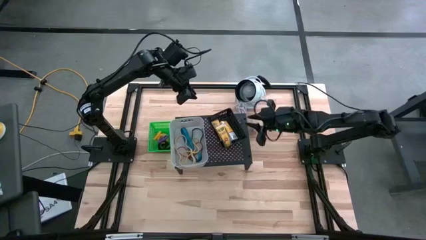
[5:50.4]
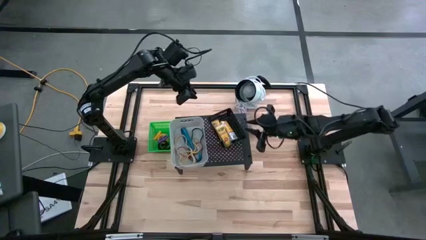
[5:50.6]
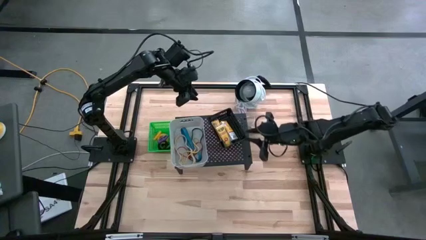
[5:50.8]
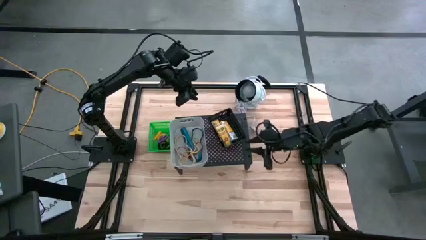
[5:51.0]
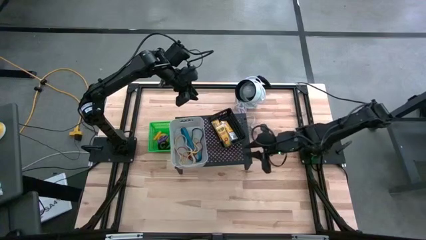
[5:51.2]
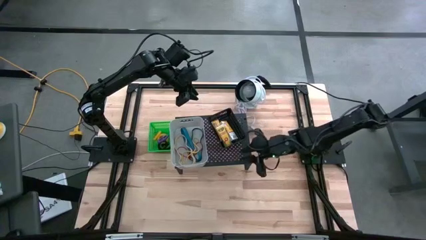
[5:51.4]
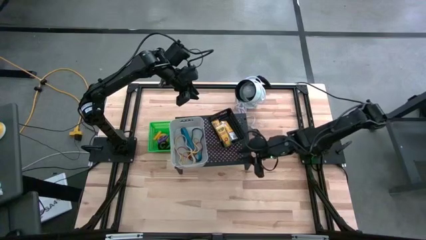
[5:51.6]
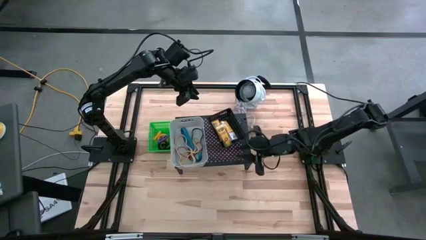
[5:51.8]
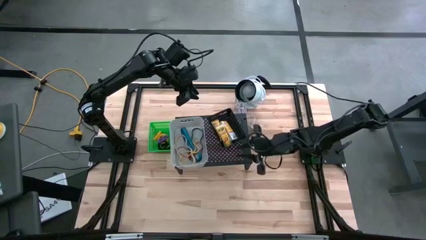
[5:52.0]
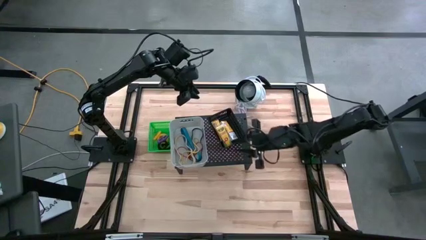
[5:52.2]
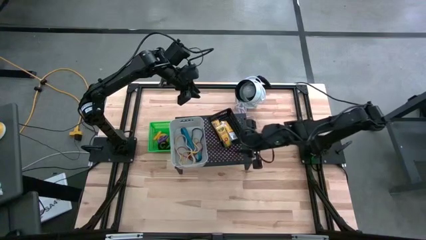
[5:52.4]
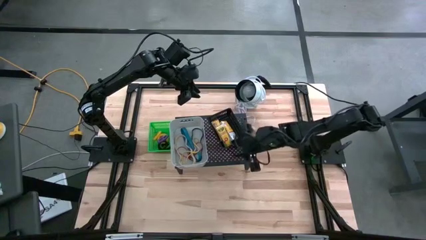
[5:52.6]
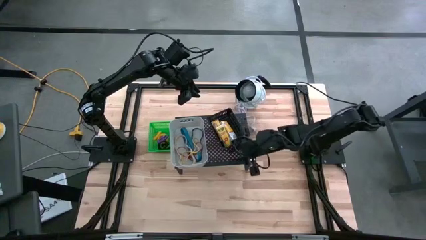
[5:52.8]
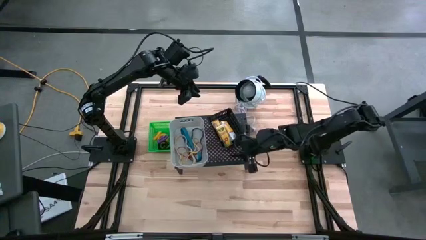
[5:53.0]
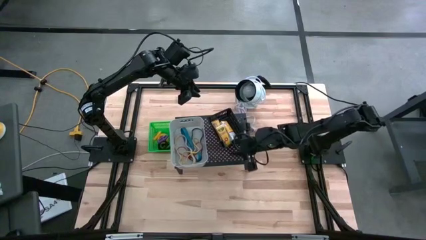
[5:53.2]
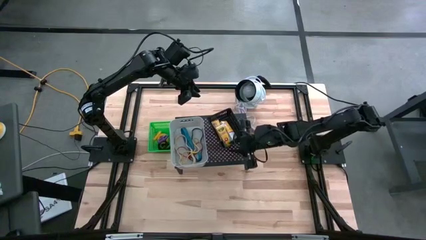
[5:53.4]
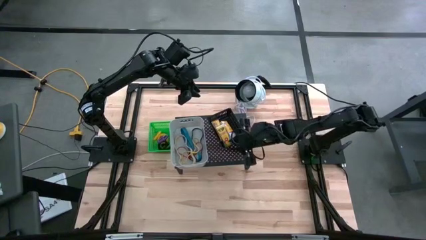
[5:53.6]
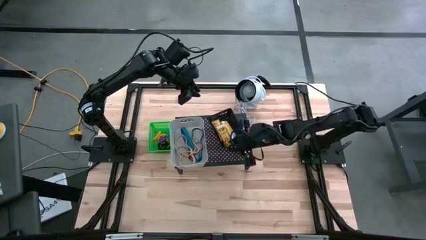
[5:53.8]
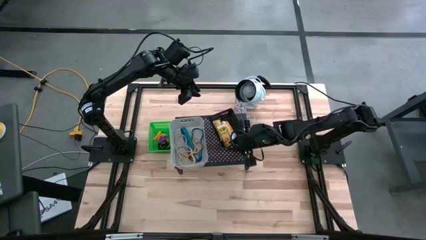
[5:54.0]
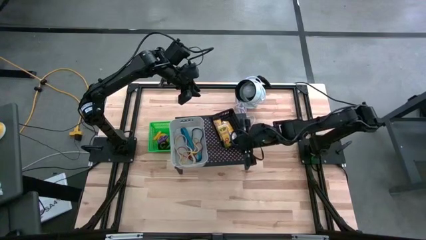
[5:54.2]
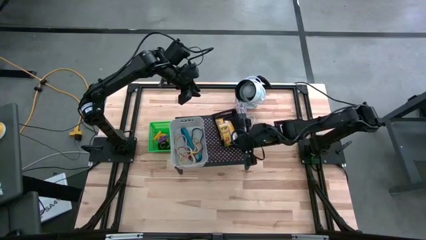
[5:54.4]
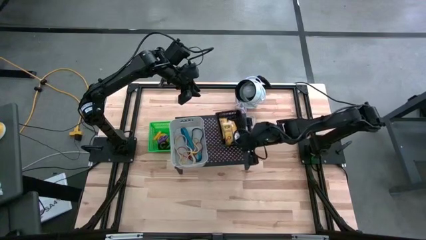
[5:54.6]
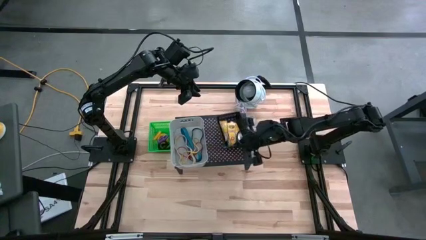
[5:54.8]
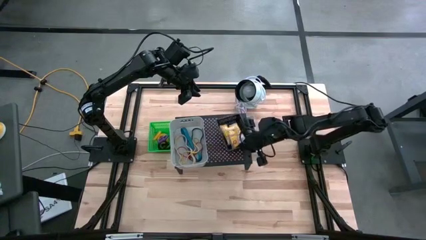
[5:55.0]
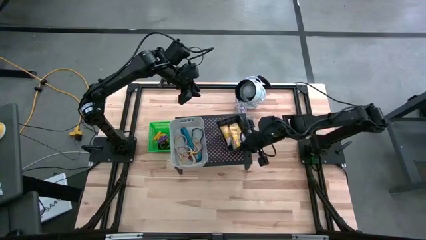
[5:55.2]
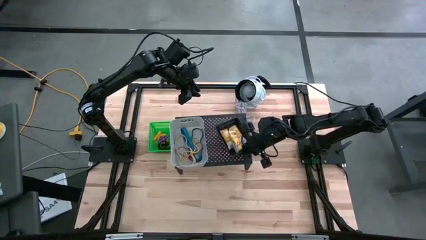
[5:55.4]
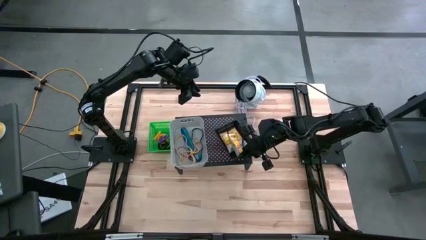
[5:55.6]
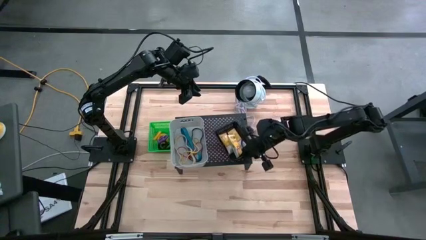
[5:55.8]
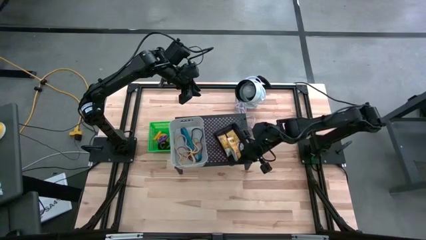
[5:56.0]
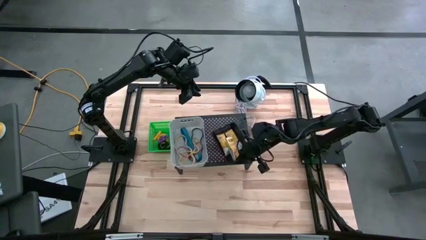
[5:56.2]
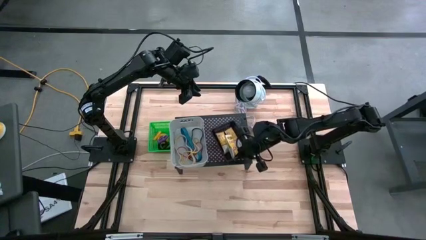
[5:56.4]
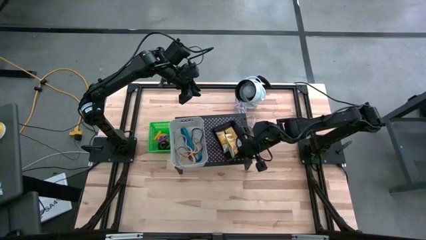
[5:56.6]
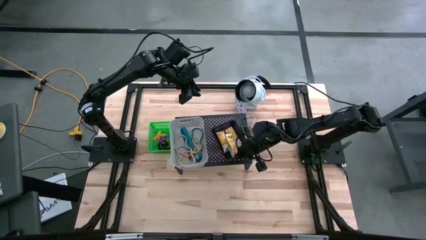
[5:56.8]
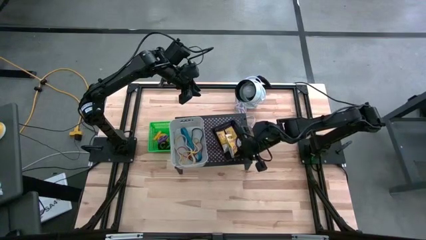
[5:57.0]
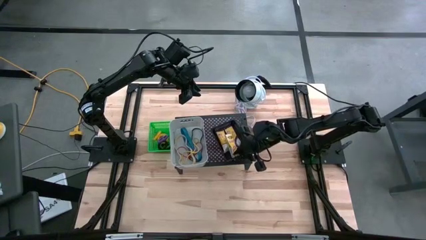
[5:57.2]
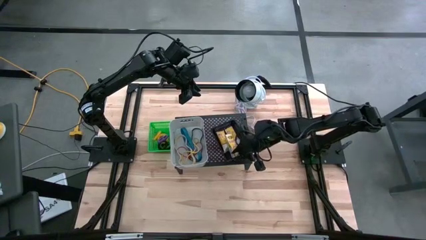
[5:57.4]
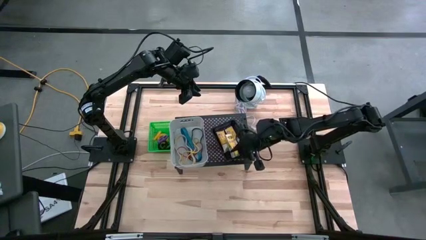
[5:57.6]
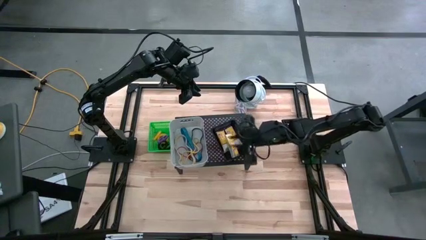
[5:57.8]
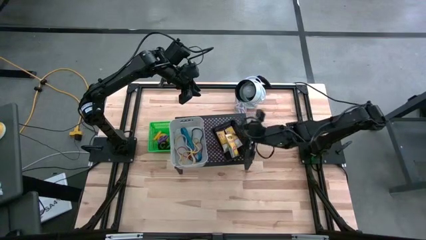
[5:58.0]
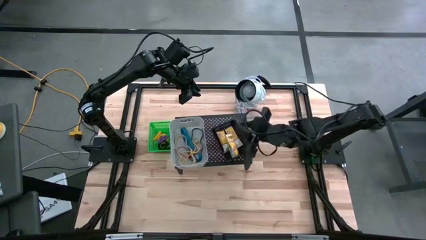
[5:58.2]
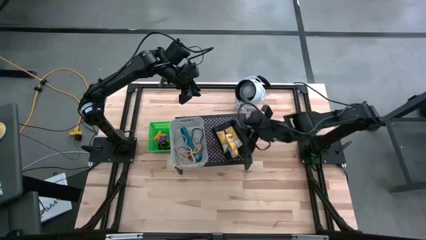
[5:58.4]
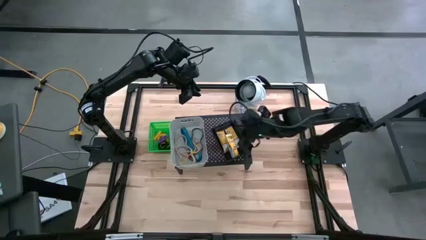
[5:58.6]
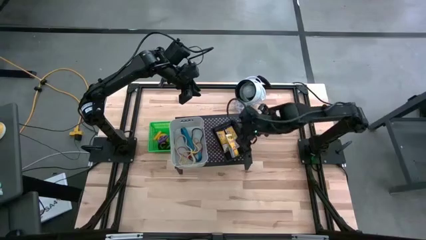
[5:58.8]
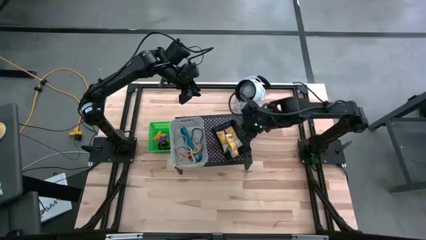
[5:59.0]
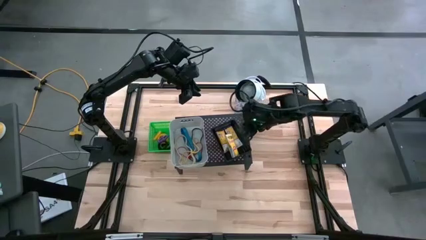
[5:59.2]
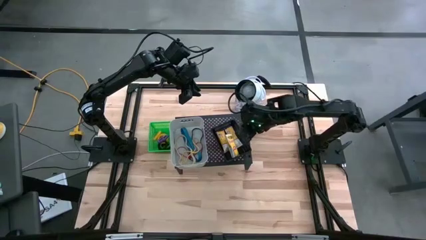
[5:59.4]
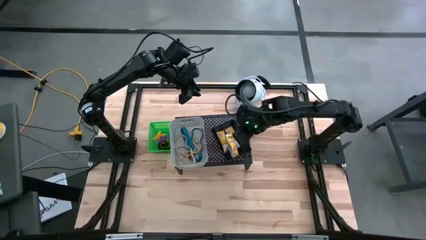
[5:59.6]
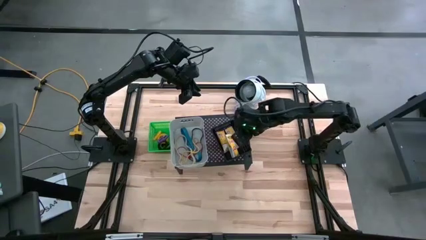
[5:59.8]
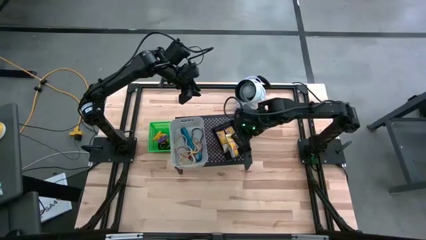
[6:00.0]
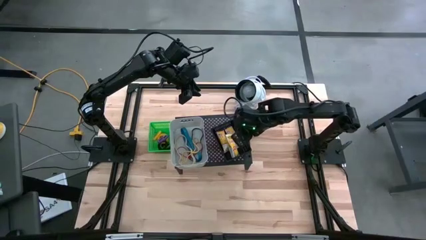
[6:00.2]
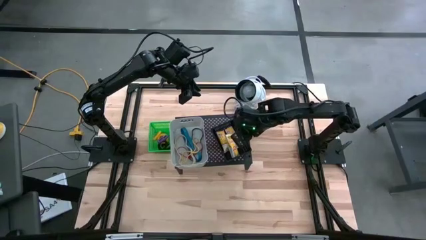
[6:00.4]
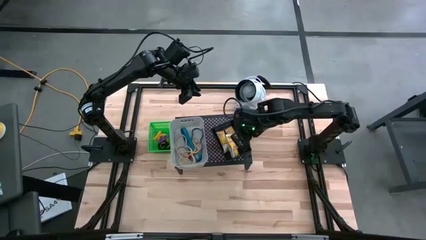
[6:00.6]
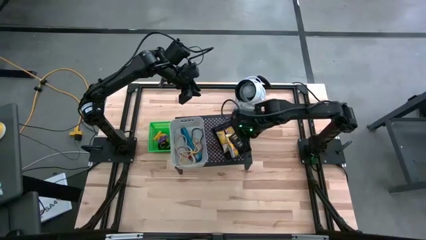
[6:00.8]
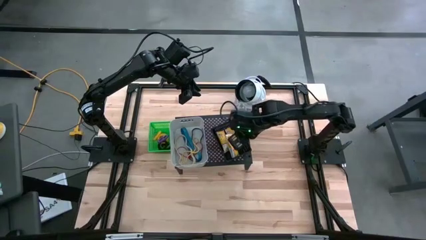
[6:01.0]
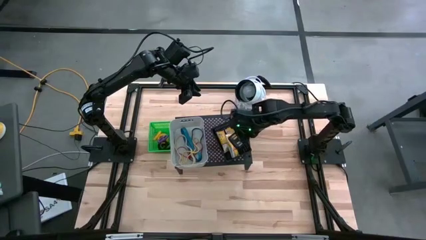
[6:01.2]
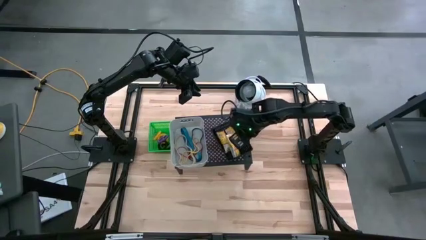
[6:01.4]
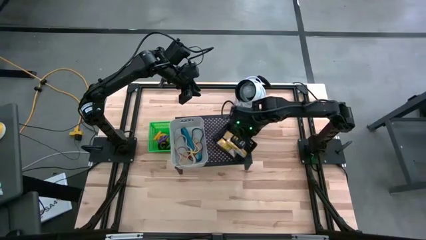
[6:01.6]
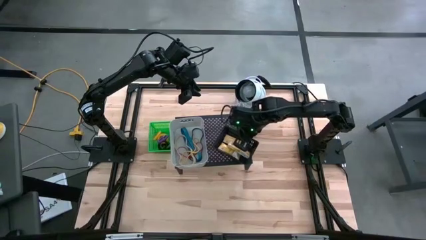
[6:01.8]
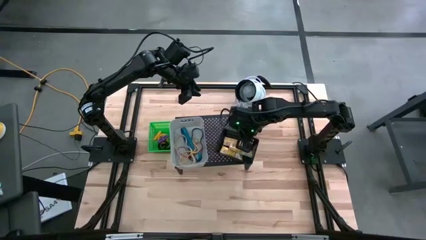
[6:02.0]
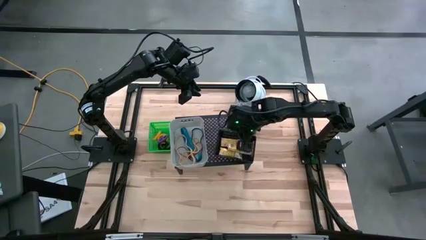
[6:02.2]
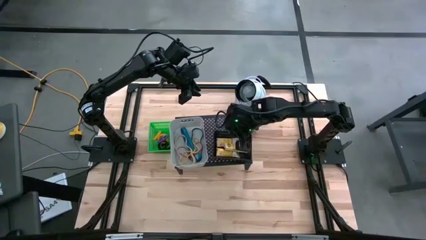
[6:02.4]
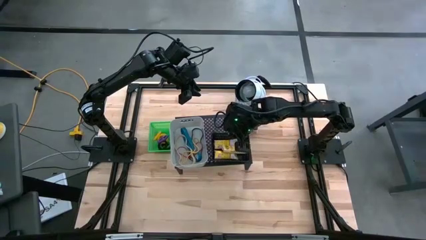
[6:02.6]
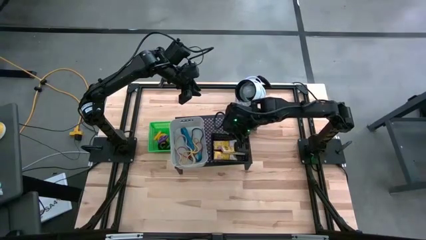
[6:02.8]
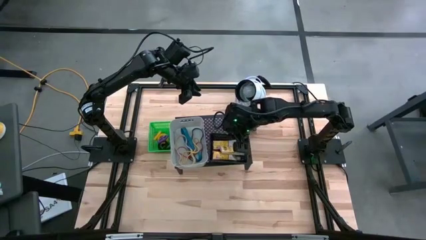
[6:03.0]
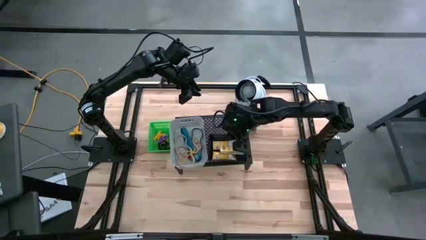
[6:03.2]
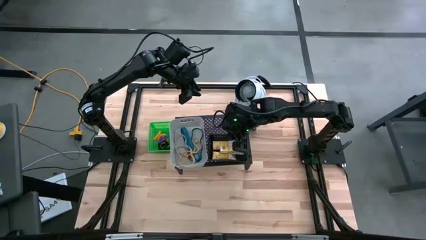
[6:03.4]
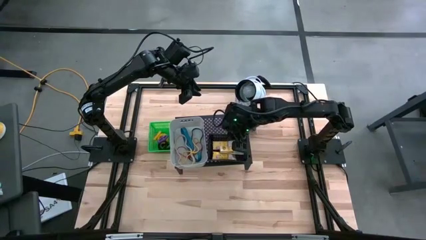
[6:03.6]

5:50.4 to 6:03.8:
Task: Pick & Place Office Desk Supplies
Put the black bin with the crayon boxes on the shelf

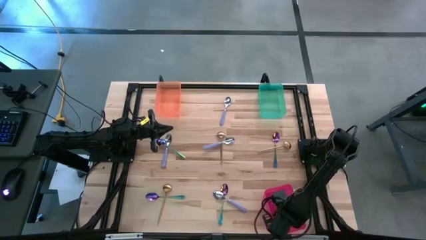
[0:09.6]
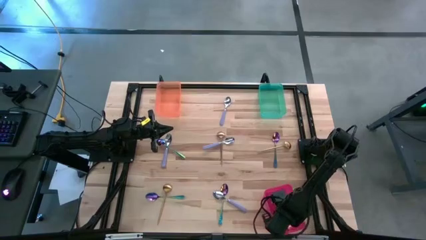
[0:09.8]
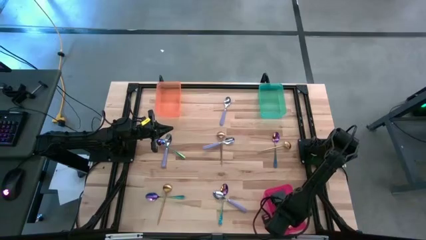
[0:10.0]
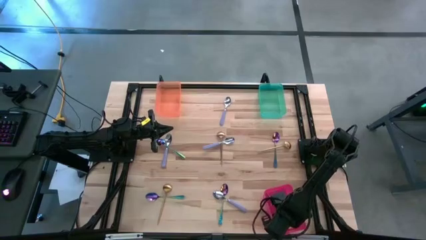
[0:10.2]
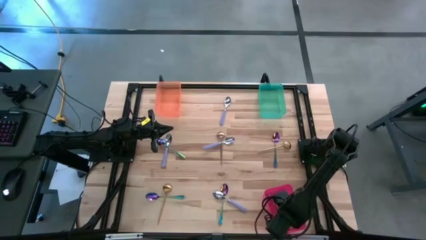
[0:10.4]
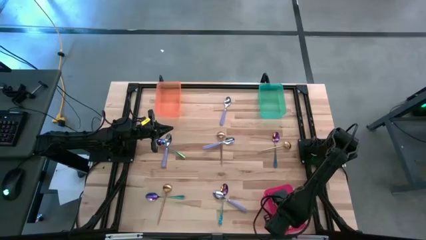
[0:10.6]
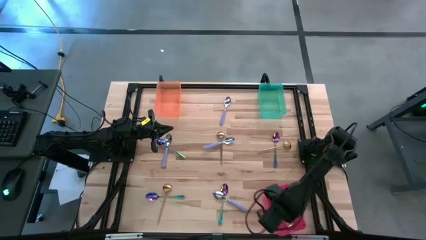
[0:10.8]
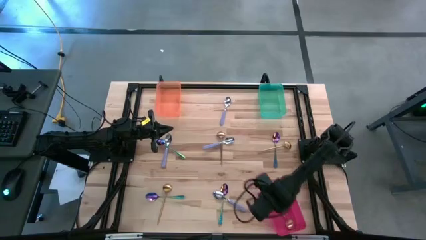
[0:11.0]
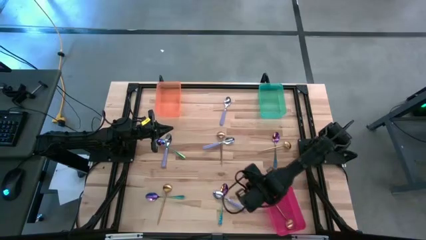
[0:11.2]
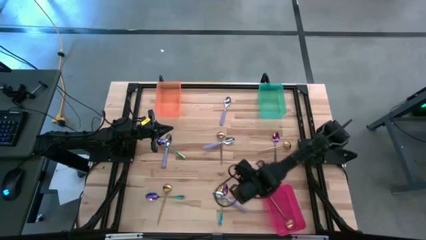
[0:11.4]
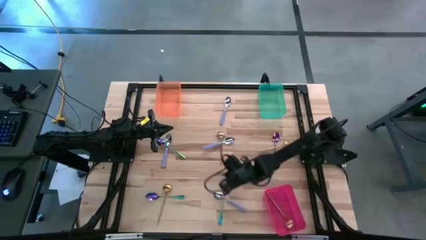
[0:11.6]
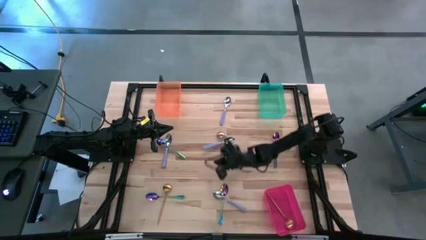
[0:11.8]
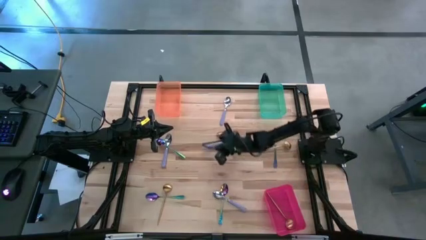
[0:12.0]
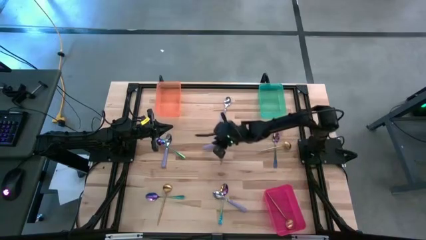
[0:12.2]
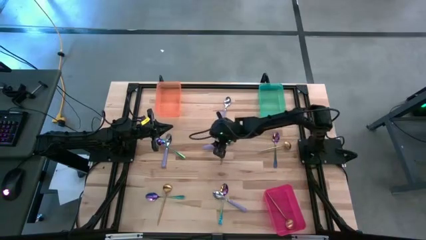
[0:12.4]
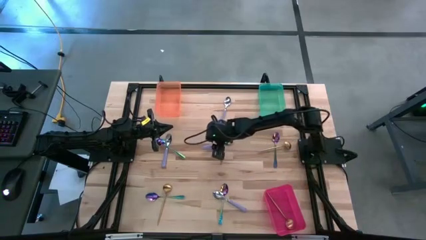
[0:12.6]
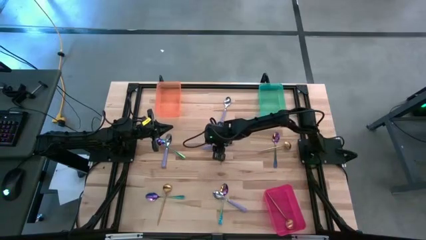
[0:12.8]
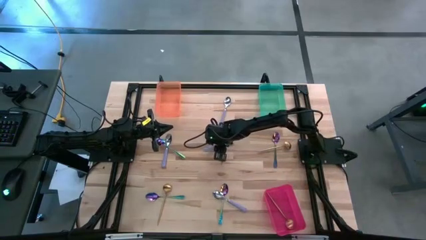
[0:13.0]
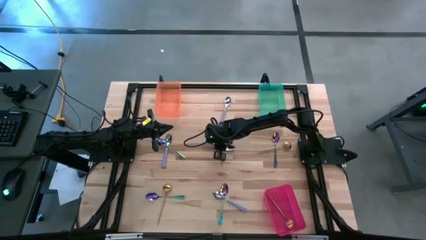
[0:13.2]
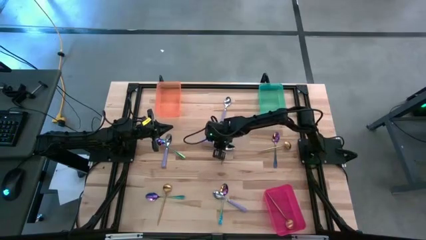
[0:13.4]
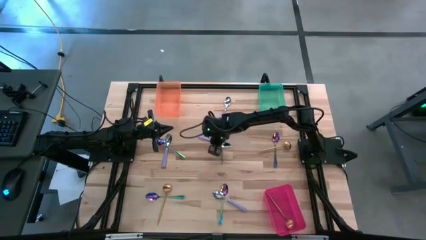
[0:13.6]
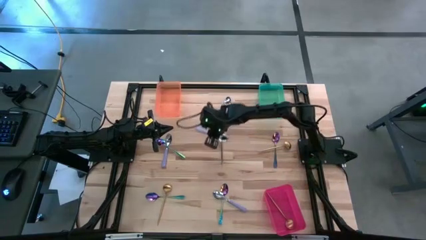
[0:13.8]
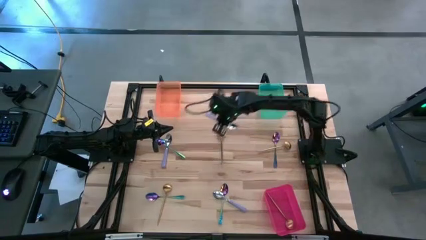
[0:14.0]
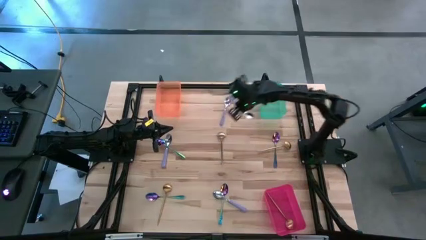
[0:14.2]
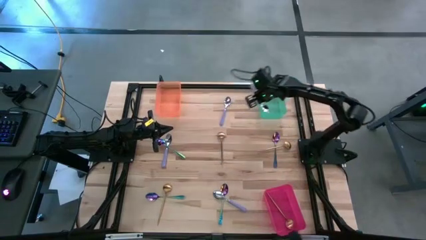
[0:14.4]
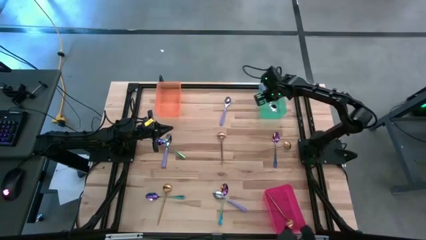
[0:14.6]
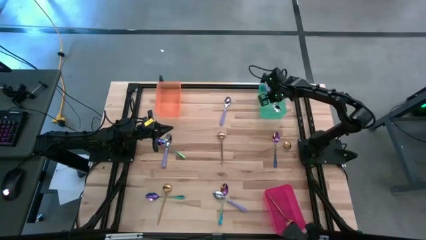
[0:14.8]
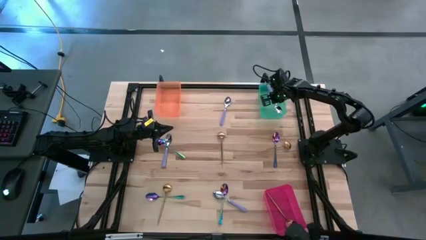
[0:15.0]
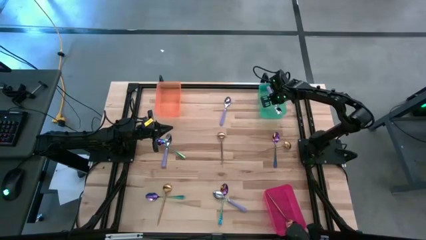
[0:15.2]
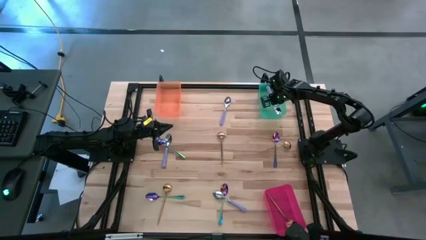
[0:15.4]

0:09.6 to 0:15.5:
Task: Sort silverware by color (type)
Put the purple spoon into the green bin
